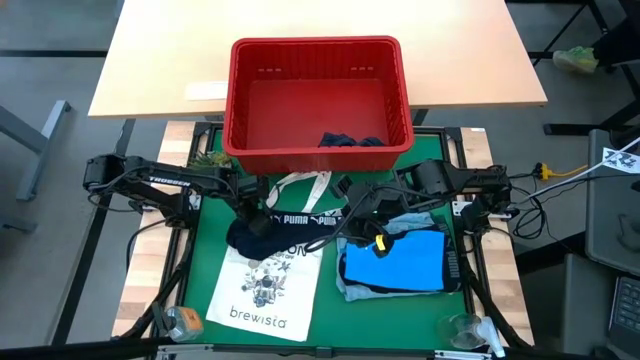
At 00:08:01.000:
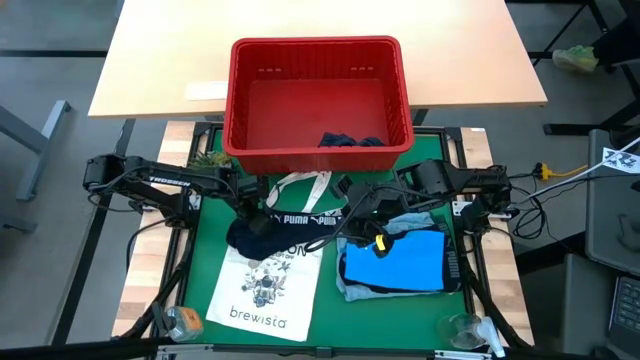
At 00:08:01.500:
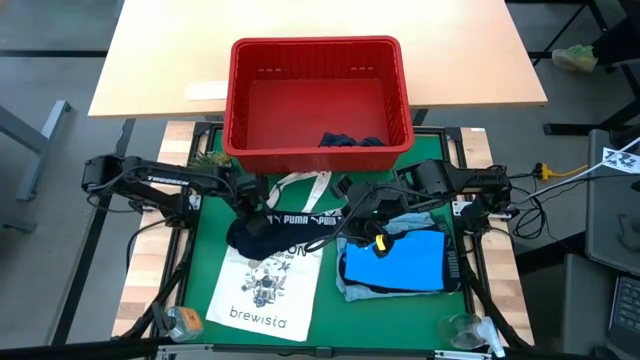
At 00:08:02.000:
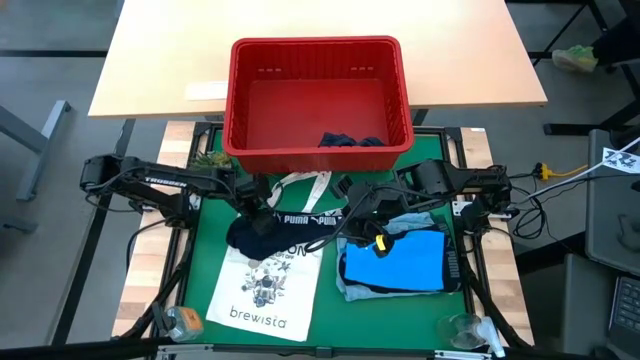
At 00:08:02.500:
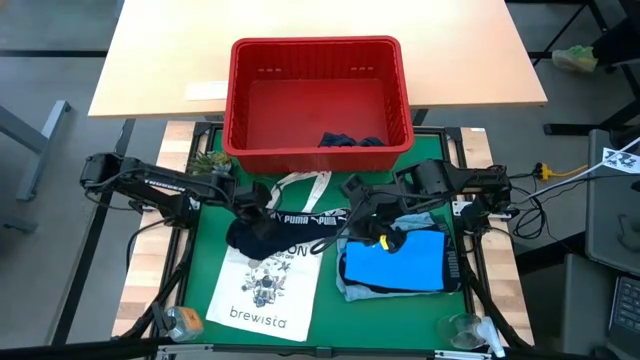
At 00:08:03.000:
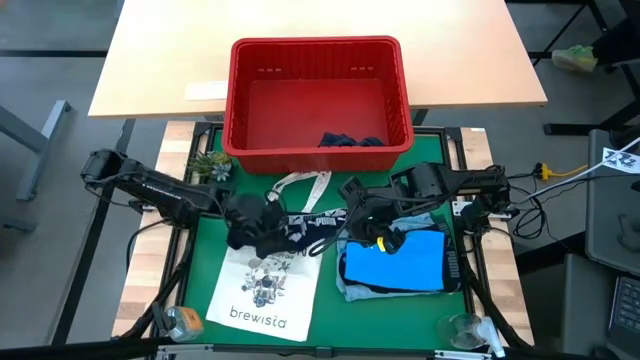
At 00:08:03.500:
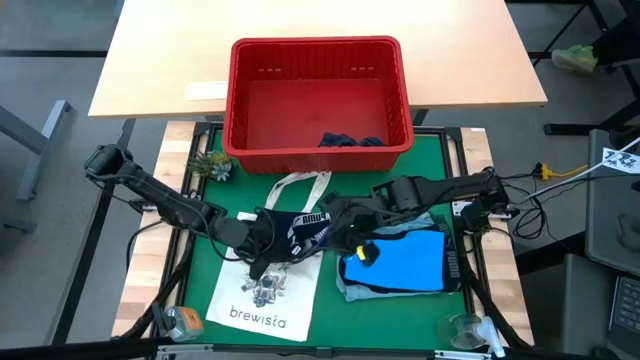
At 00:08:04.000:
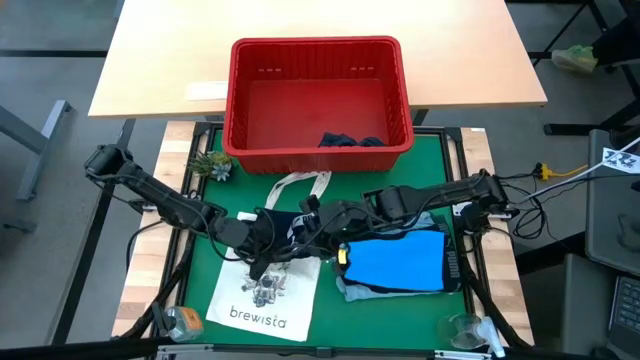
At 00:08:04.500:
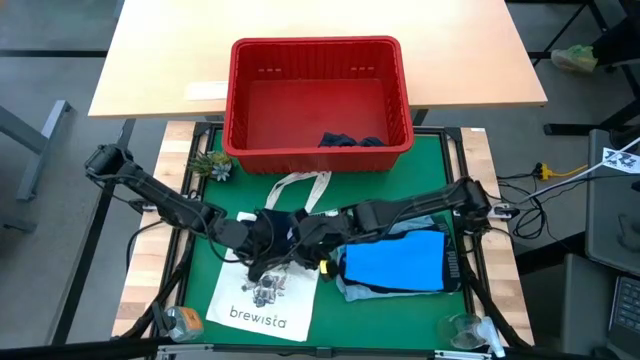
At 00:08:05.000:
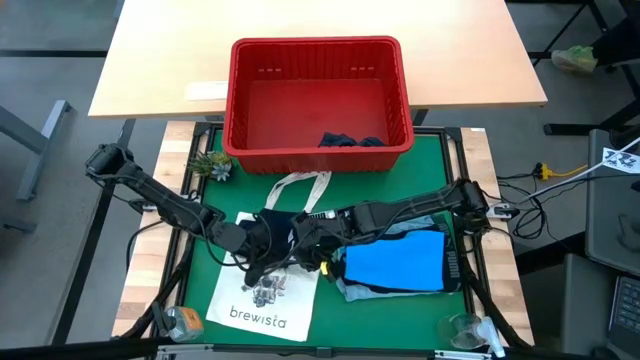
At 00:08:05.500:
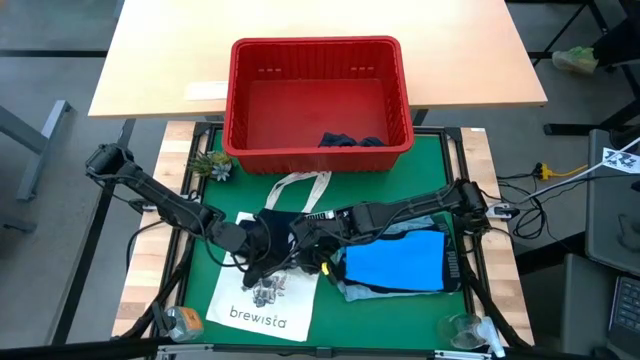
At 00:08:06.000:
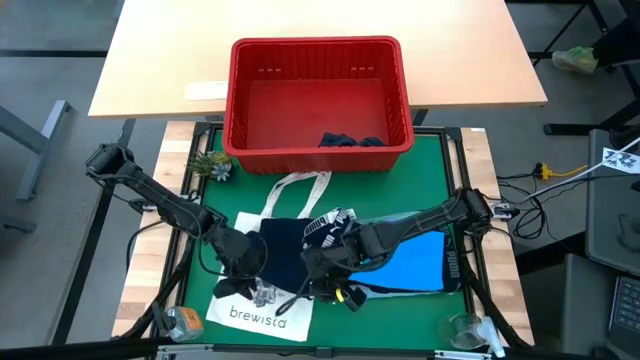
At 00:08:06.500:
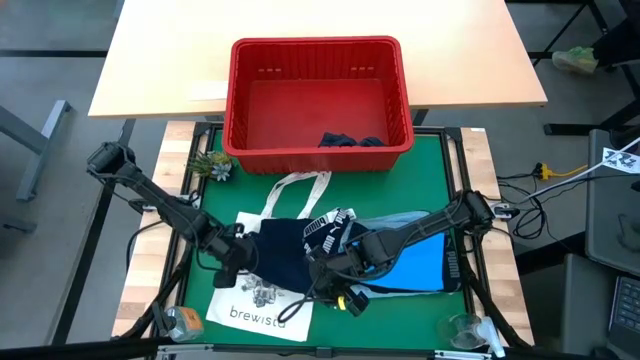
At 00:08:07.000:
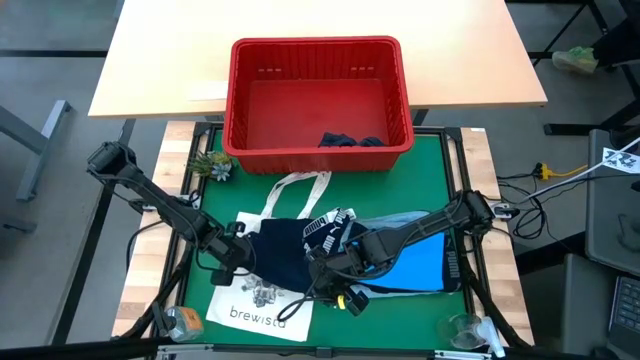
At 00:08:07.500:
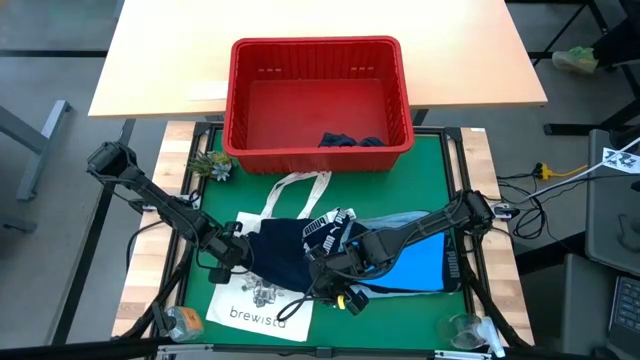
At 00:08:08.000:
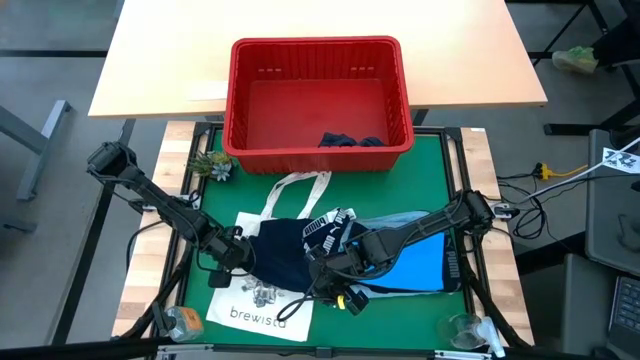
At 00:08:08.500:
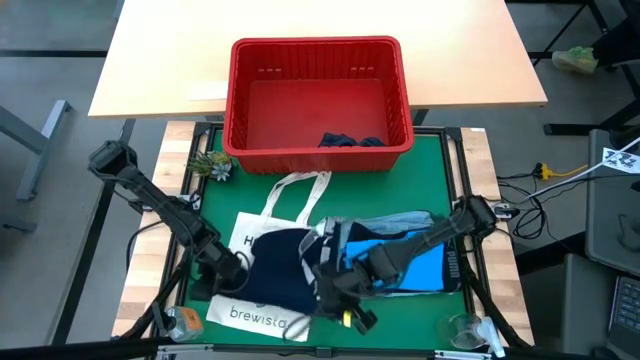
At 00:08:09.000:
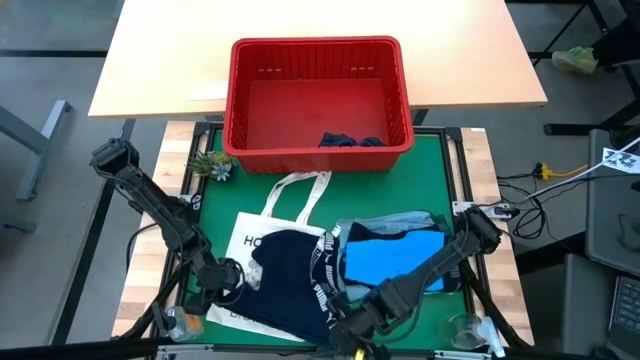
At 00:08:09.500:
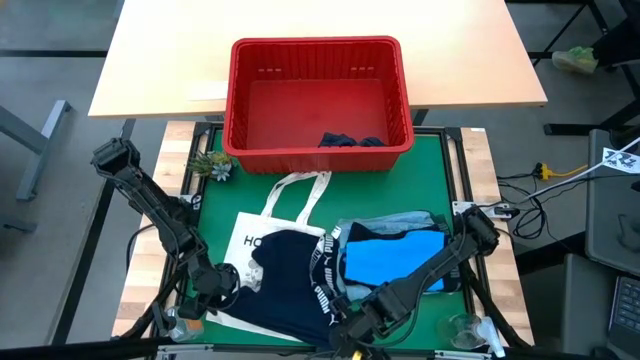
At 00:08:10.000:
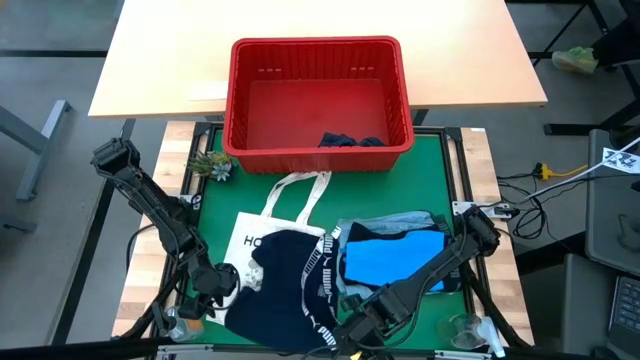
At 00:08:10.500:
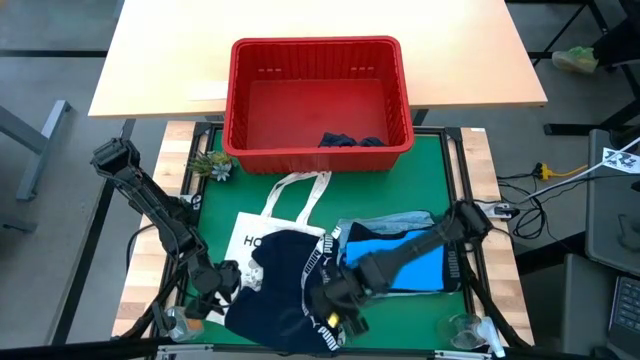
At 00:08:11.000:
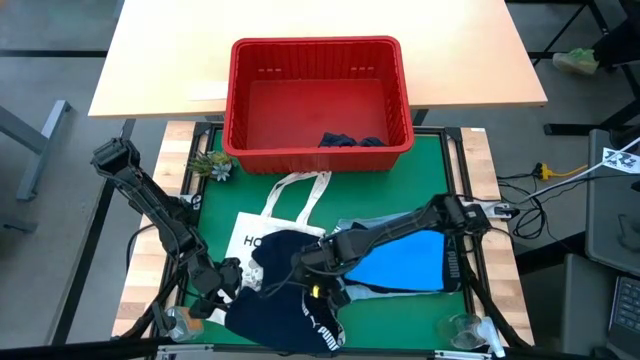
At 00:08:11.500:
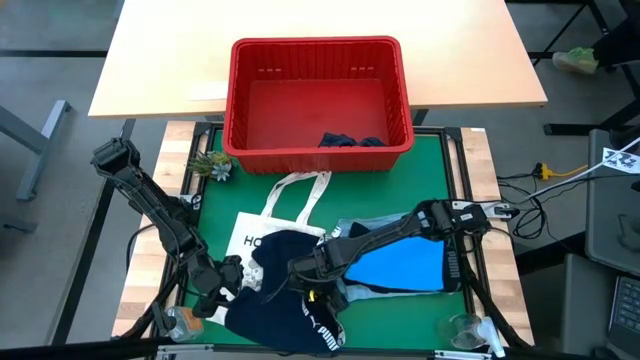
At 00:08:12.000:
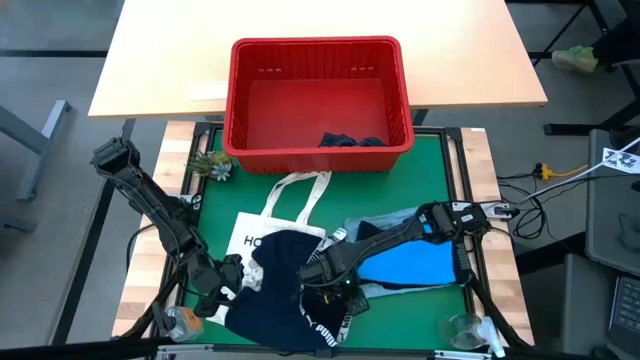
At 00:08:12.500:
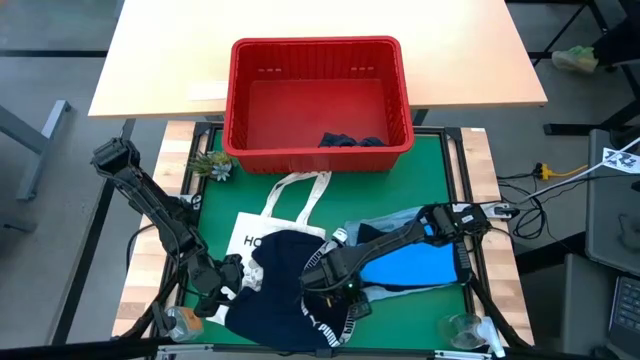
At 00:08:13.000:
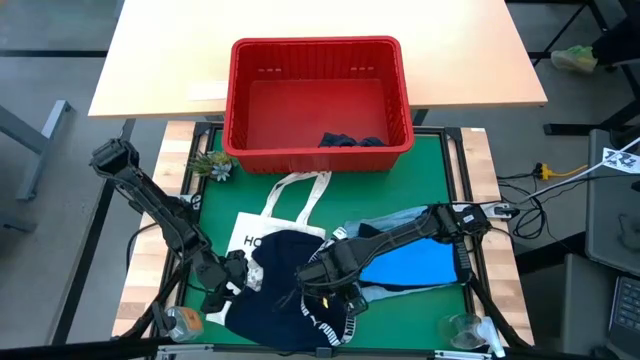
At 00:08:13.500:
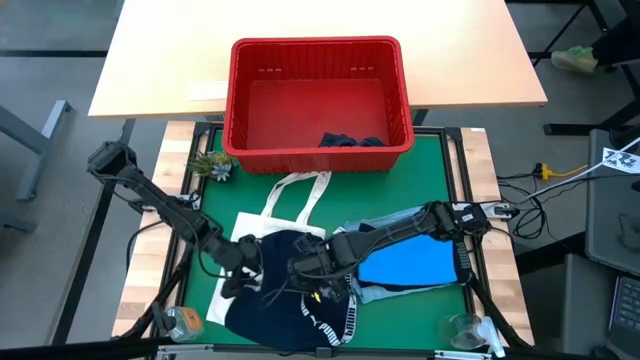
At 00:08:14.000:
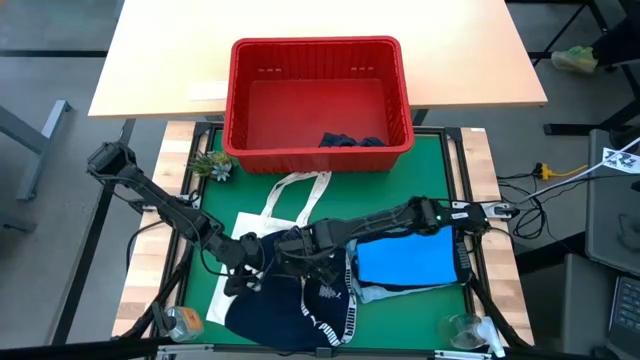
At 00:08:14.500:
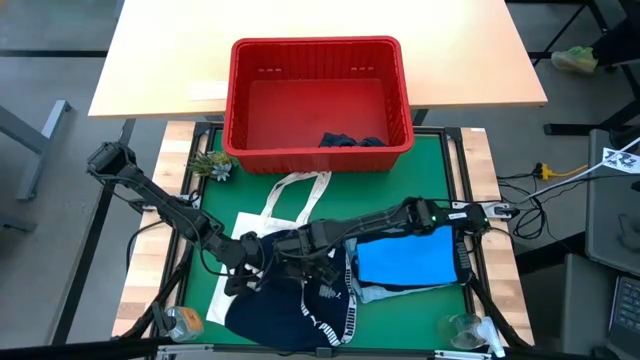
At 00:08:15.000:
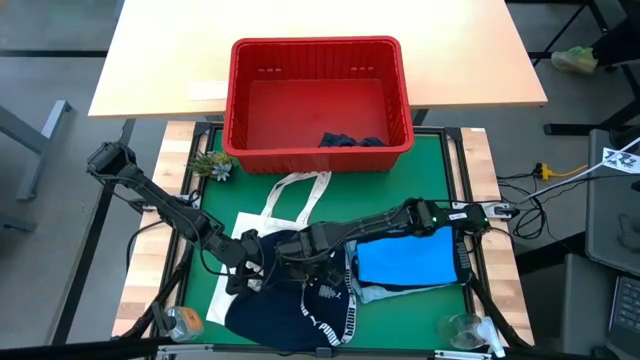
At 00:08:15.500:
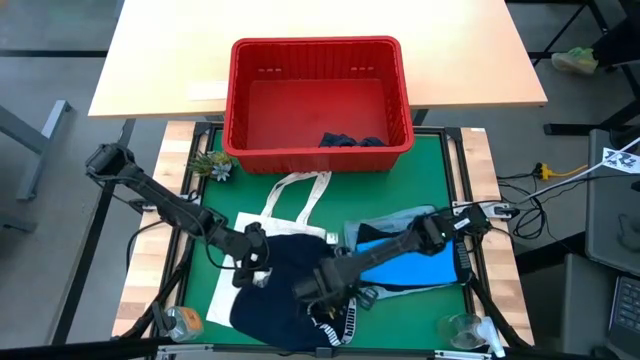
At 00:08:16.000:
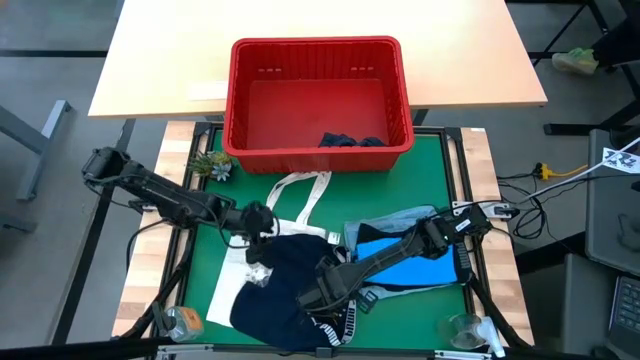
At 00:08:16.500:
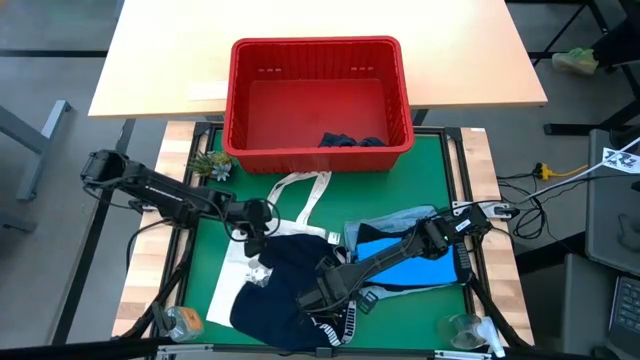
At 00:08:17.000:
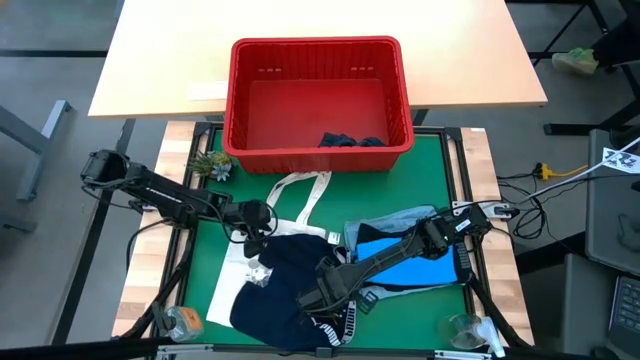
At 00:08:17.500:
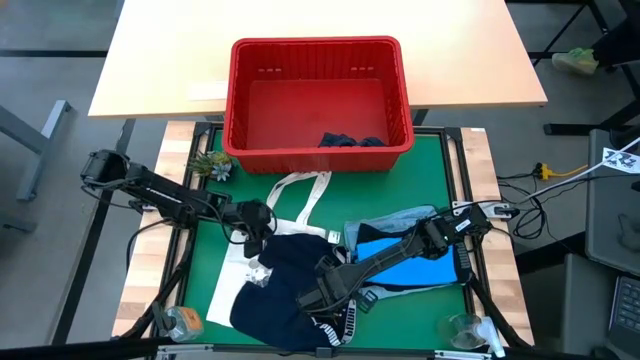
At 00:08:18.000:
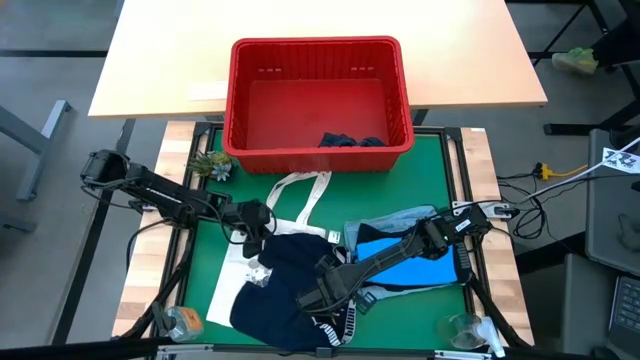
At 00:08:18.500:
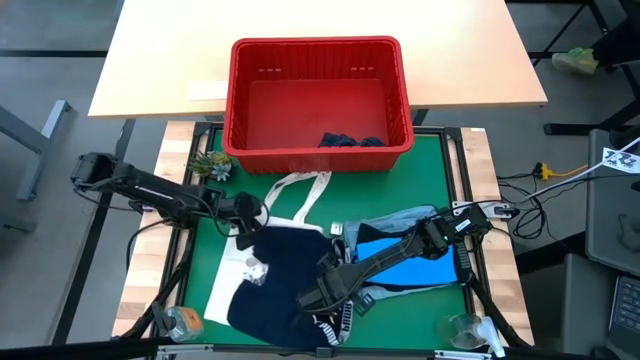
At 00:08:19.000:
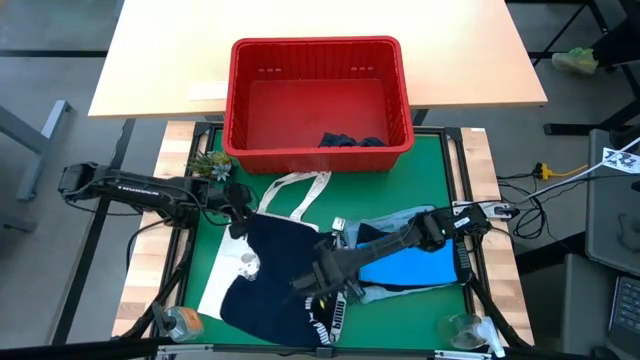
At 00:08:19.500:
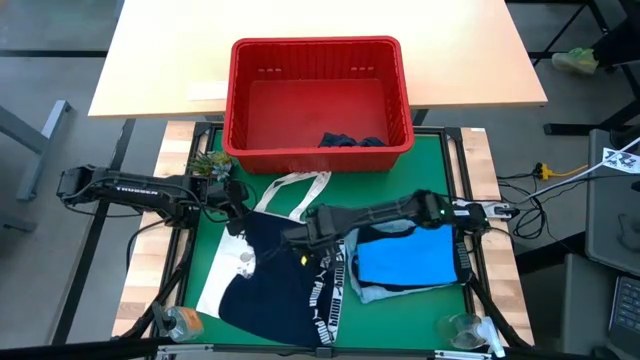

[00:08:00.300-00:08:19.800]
Task: Fold Laundry from Bin
Fold the dark blue boxer
